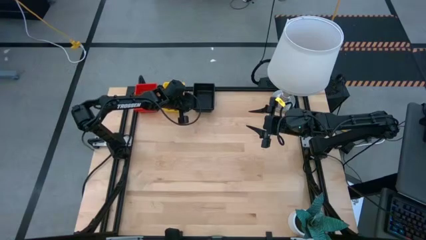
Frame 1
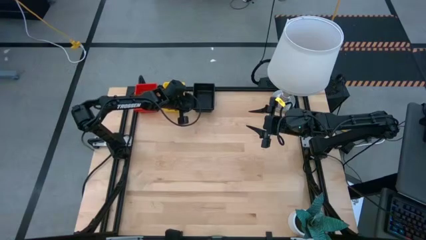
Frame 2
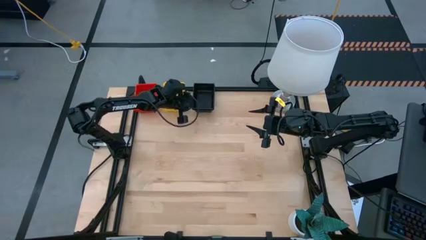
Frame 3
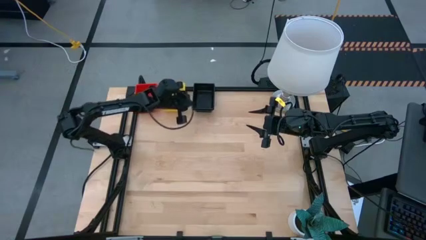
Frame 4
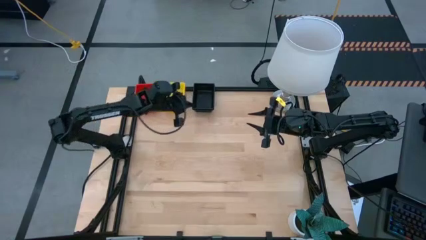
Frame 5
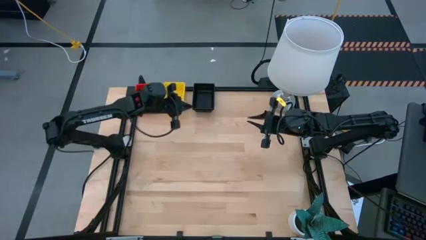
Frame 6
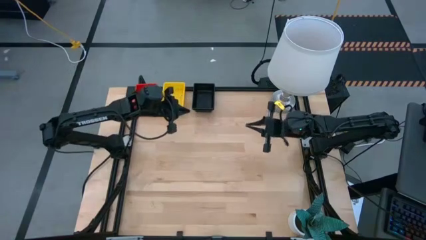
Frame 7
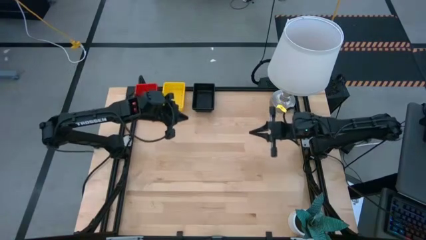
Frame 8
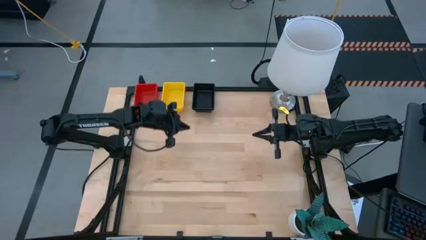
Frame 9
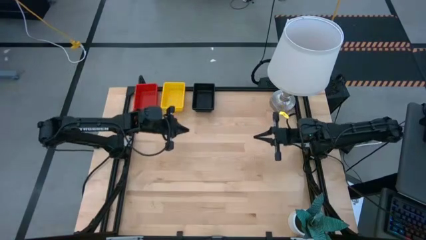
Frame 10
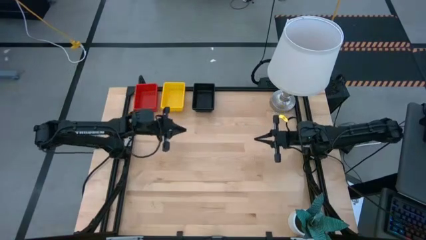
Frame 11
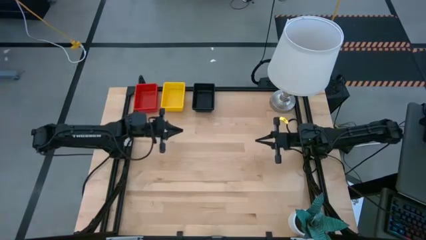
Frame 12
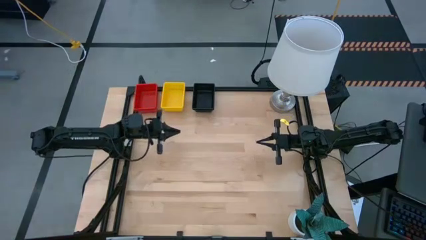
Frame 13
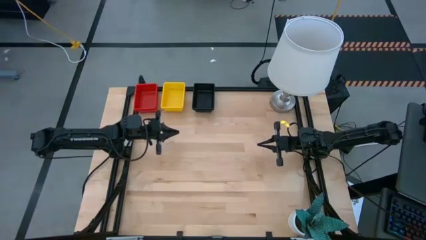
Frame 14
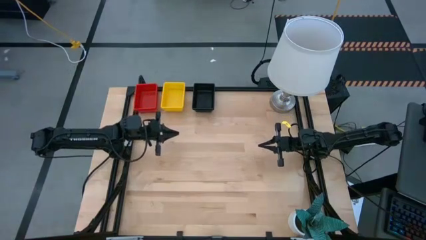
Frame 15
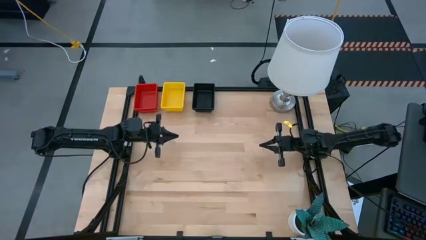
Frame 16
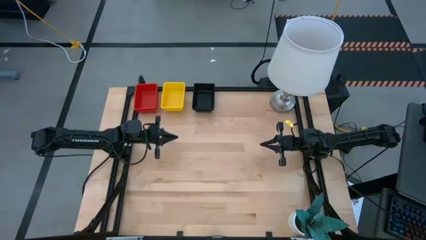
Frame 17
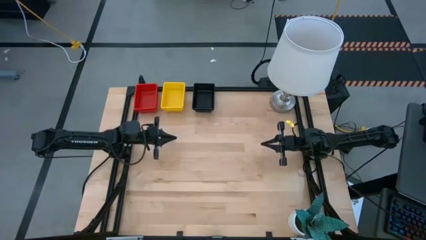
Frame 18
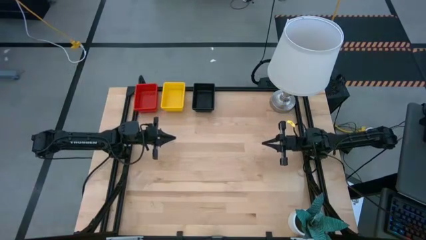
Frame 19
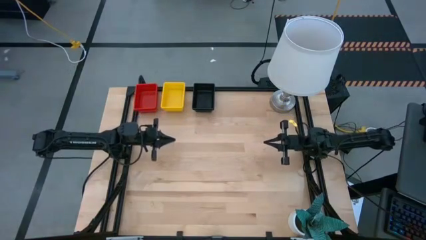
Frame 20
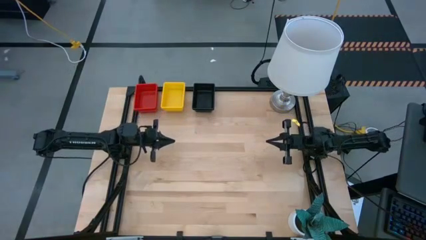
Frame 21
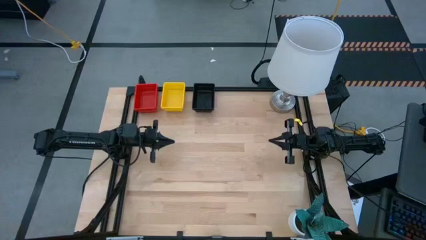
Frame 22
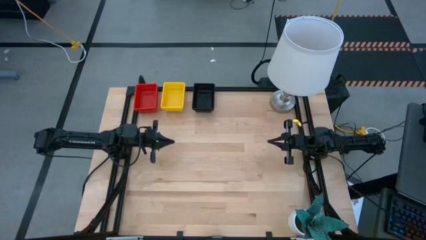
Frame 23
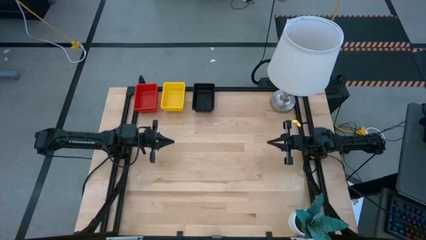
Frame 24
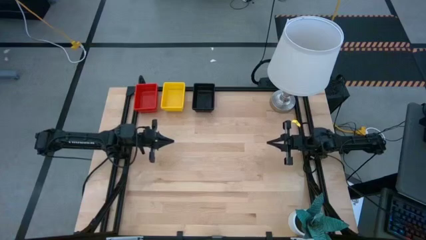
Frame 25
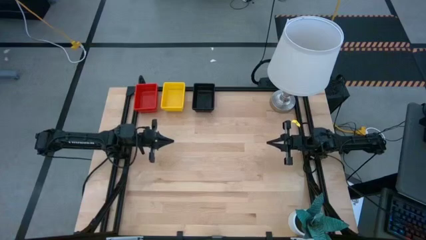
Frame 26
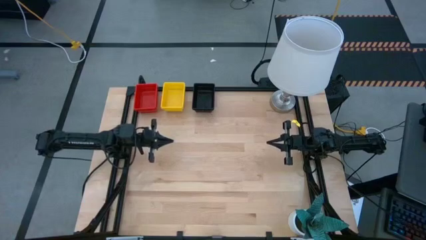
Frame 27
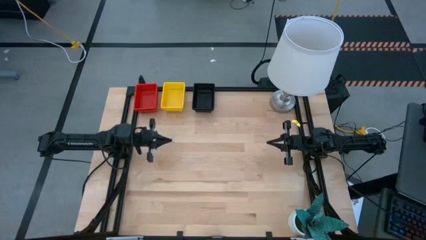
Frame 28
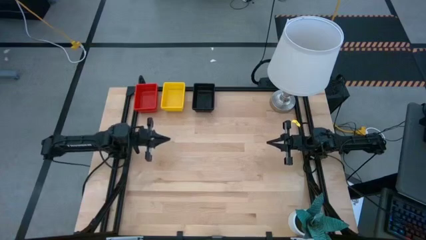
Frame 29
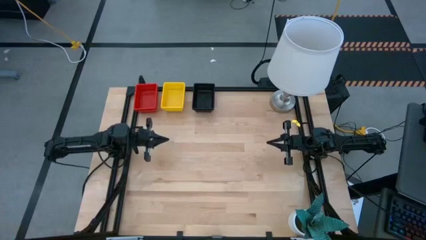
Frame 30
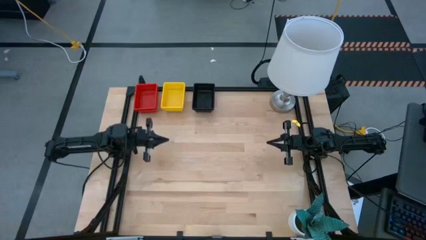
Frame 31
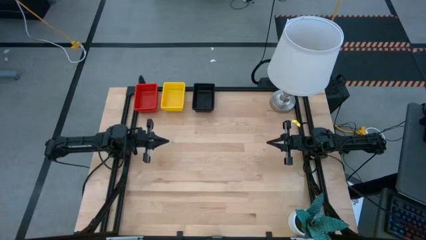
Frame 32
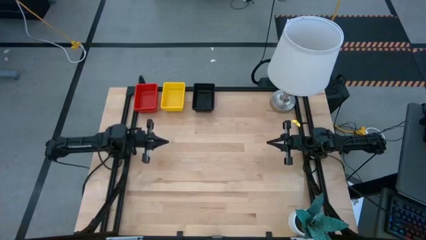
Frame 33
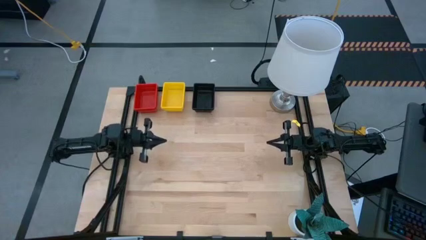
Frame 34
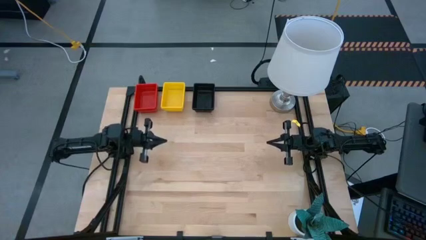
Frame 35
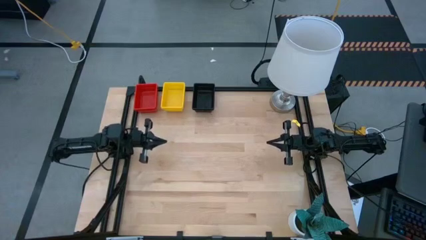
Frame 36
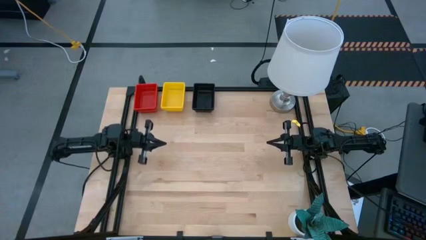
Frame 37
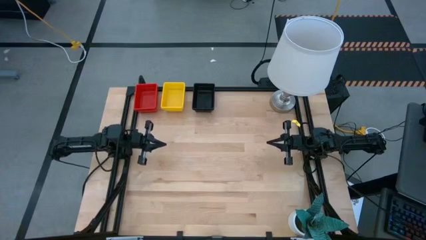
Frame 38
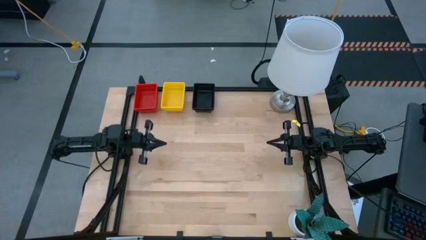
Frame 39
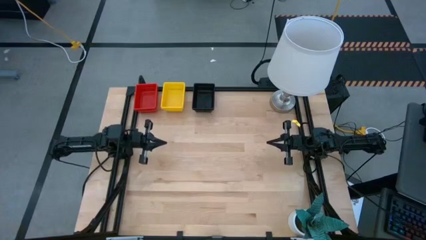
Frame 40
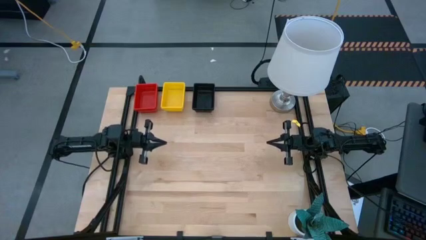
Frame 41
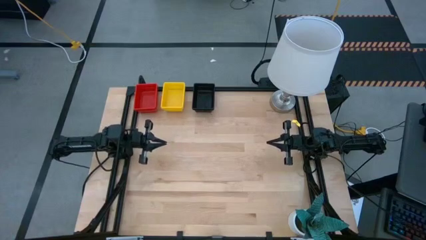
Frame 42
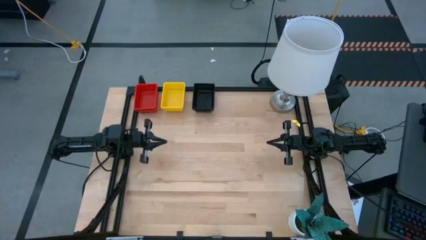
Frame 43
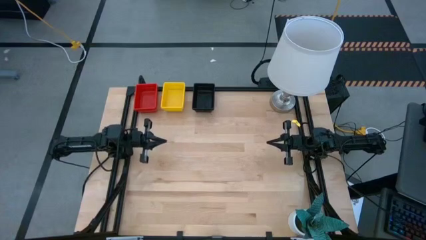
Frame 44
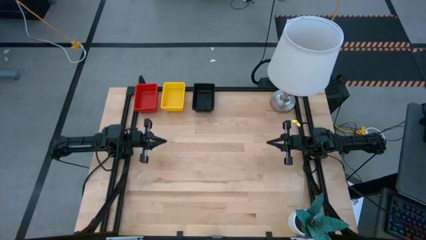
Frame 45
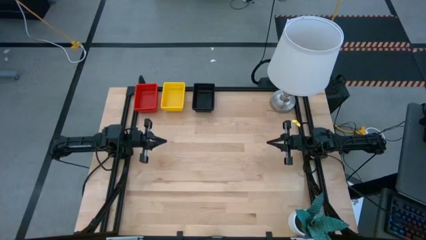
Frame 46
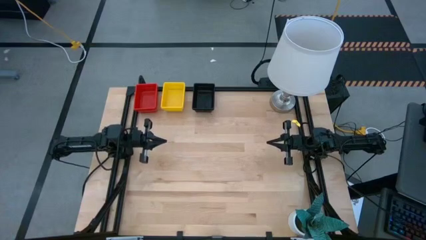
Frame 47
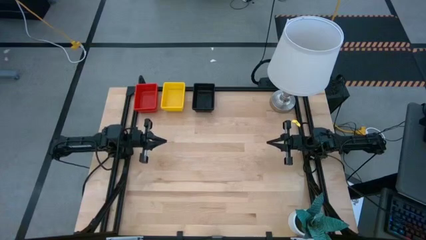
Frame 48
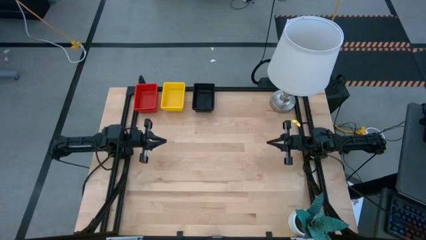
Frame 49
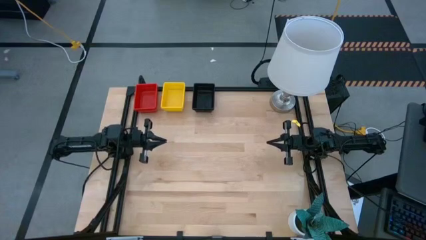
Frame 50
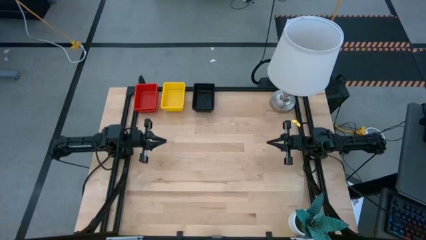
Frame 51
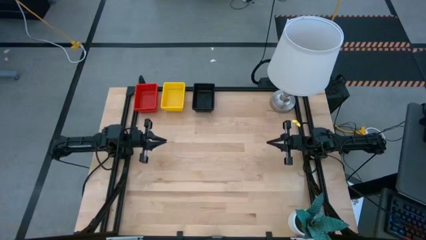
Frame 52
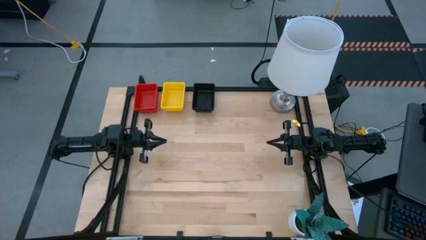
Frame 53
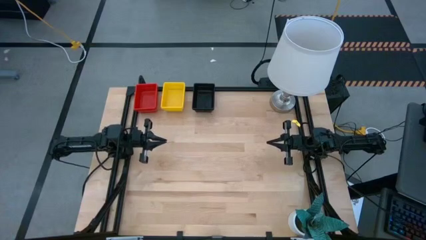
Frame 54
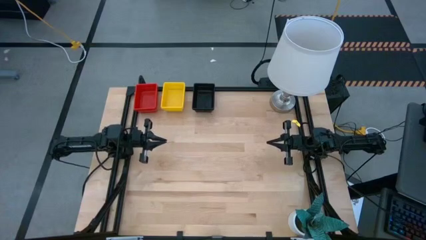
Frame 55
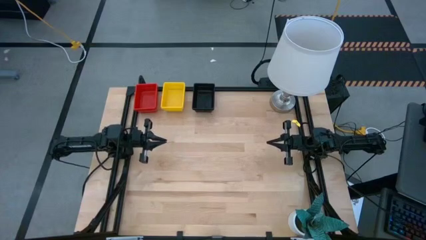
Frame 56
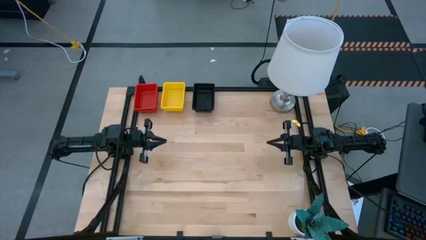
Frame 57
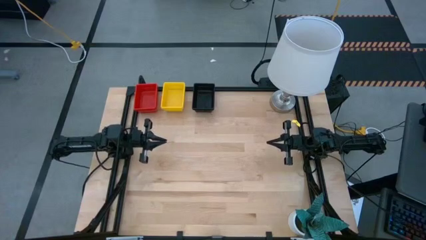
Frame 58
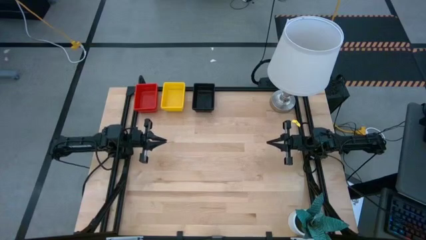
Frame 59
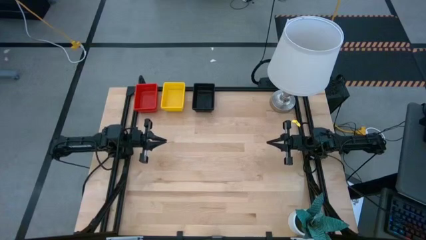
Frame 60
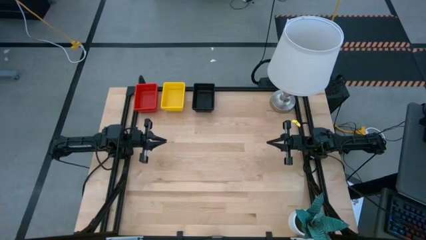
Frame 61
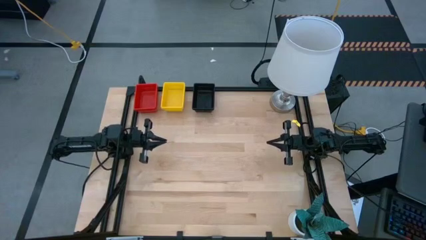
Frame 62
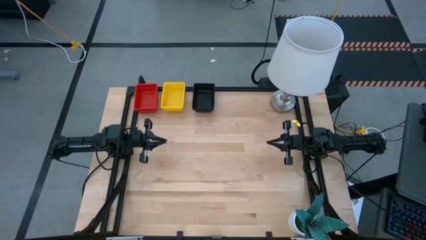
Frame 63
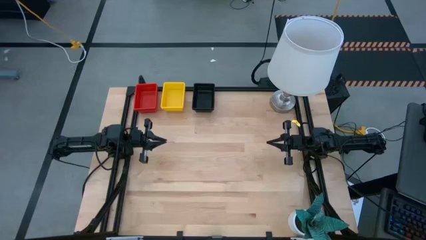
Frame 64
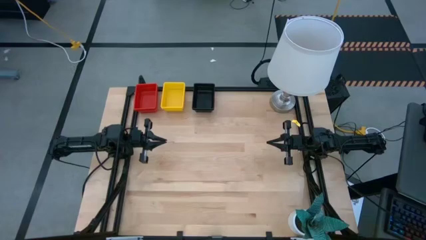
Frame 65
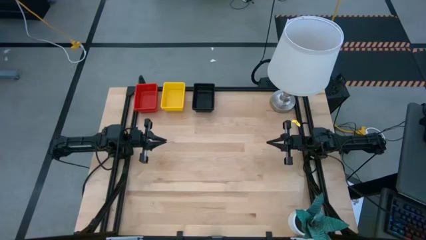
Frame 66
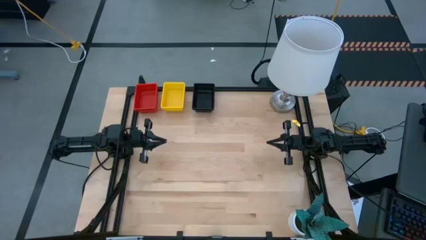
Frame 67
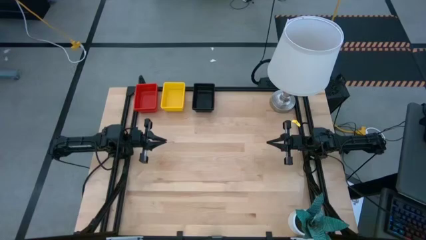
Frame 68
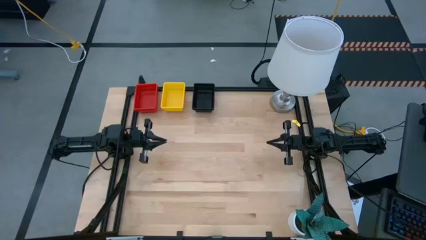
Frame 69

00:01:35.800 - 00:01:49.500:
Return to Home Position
